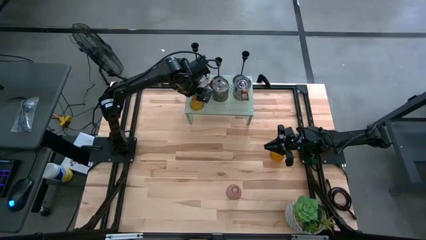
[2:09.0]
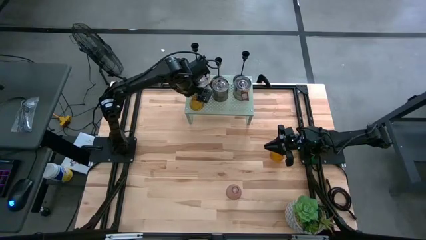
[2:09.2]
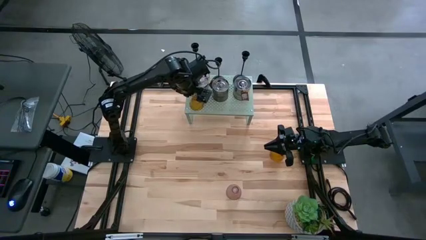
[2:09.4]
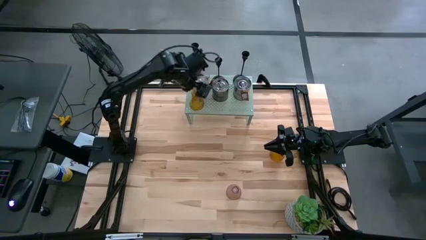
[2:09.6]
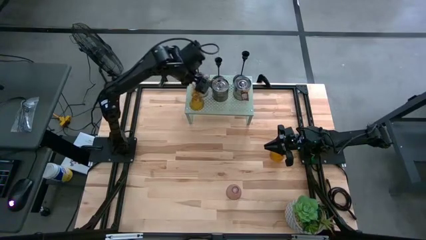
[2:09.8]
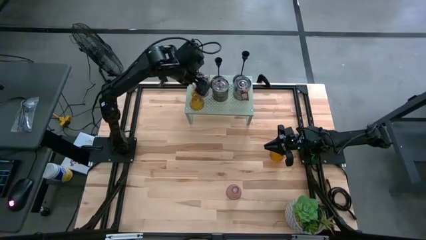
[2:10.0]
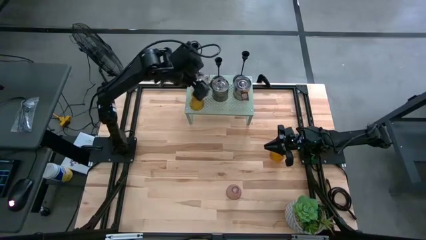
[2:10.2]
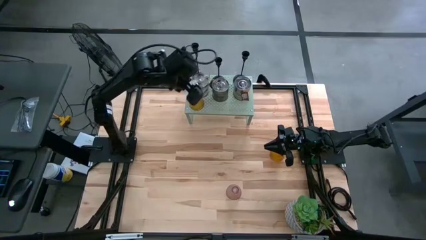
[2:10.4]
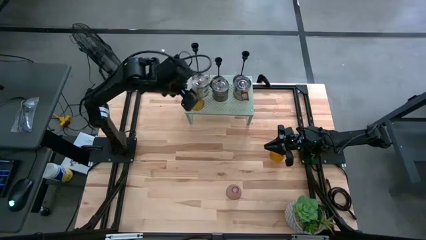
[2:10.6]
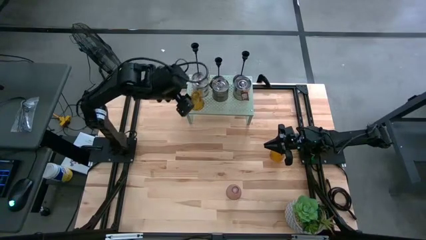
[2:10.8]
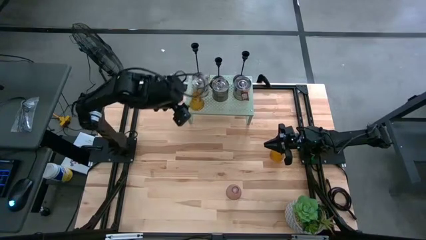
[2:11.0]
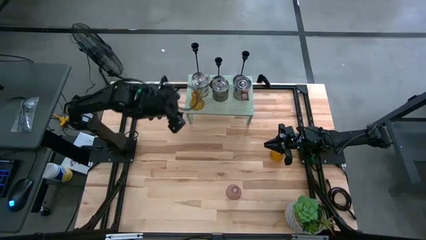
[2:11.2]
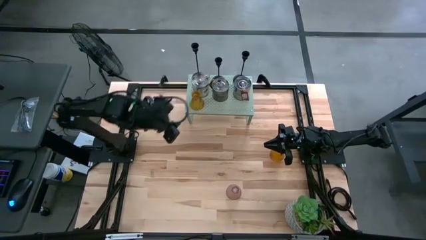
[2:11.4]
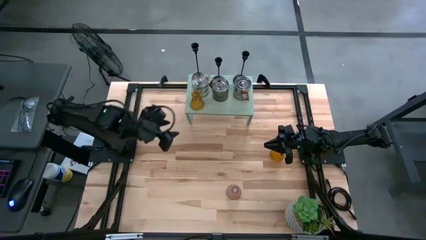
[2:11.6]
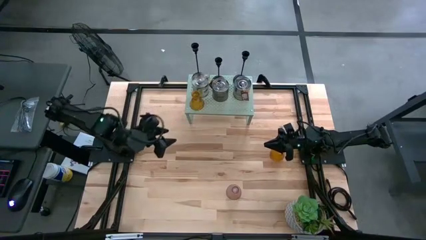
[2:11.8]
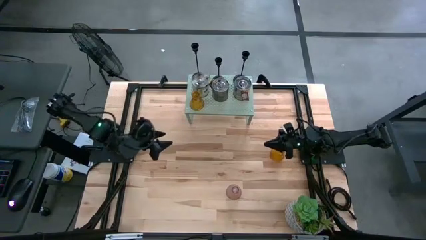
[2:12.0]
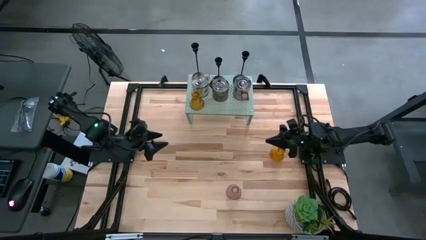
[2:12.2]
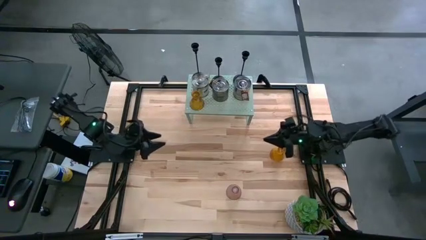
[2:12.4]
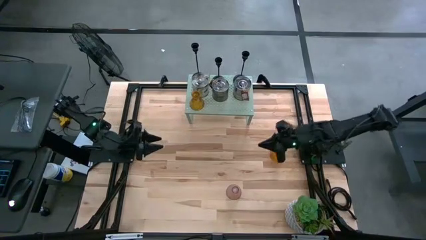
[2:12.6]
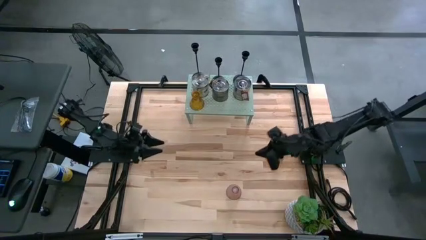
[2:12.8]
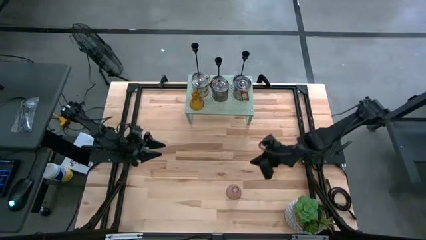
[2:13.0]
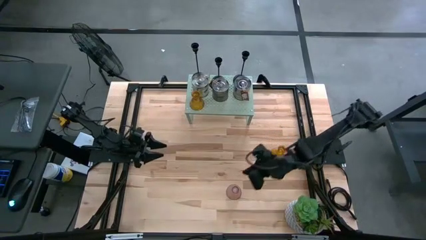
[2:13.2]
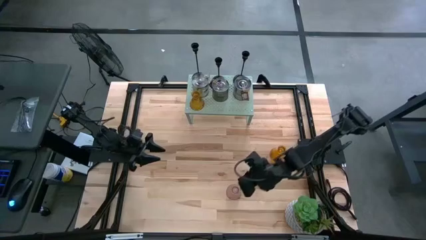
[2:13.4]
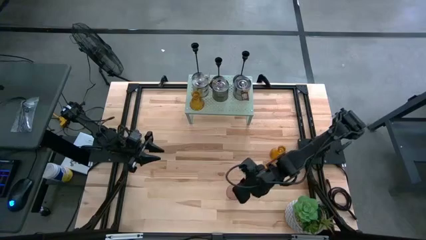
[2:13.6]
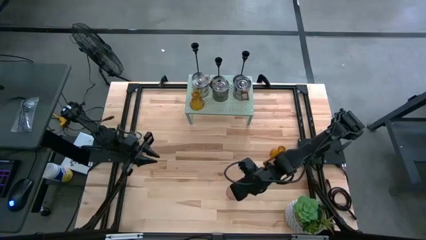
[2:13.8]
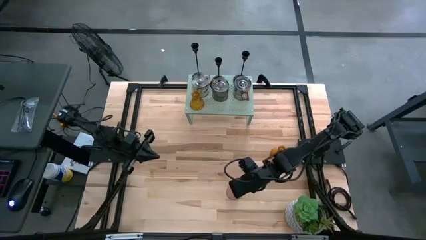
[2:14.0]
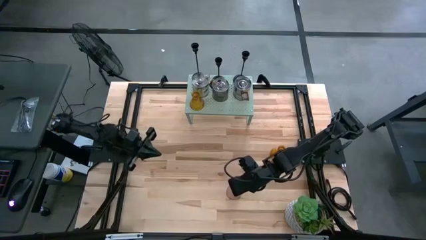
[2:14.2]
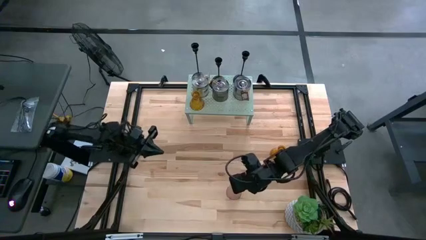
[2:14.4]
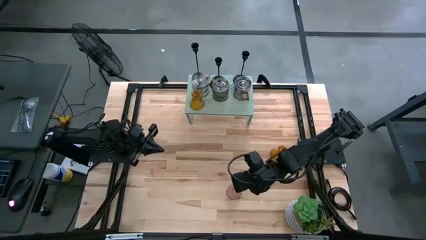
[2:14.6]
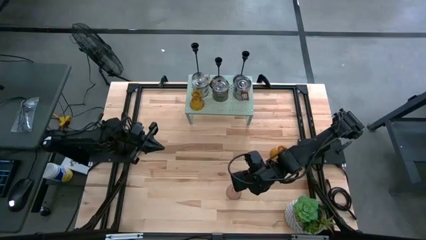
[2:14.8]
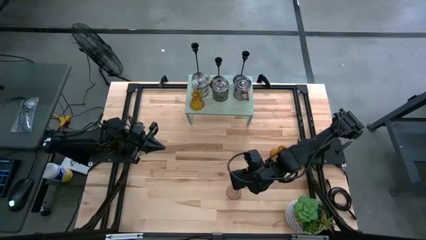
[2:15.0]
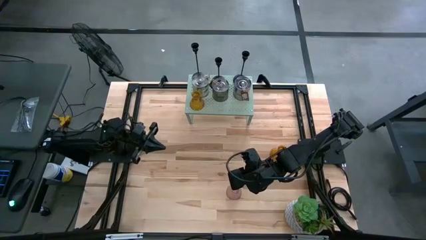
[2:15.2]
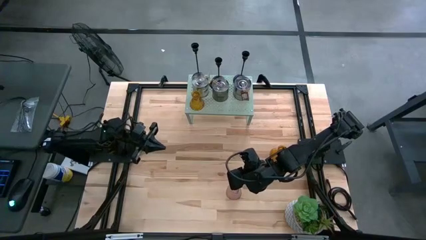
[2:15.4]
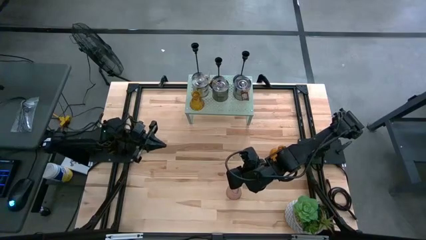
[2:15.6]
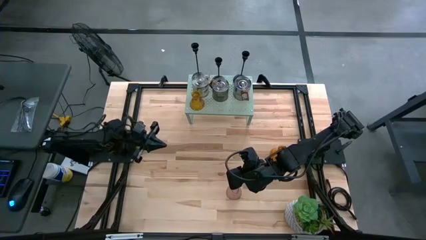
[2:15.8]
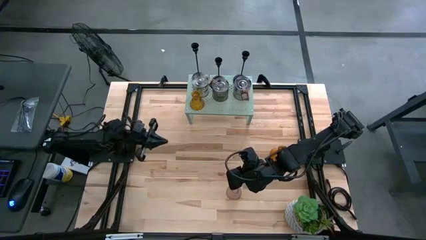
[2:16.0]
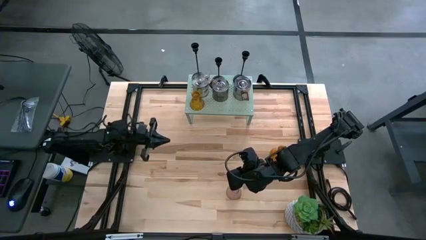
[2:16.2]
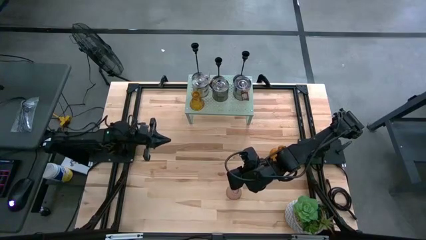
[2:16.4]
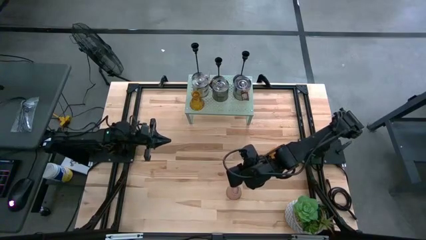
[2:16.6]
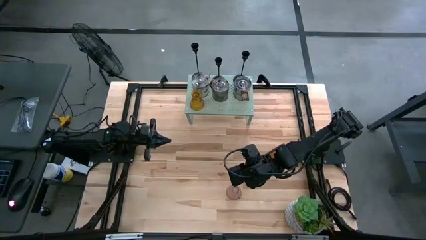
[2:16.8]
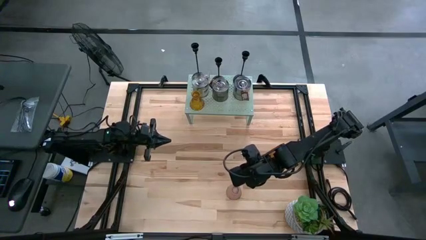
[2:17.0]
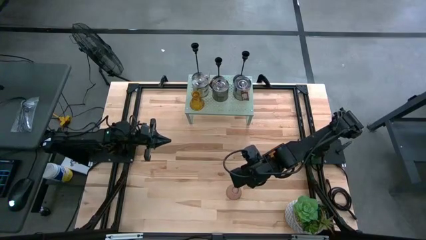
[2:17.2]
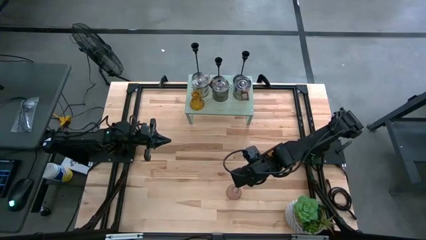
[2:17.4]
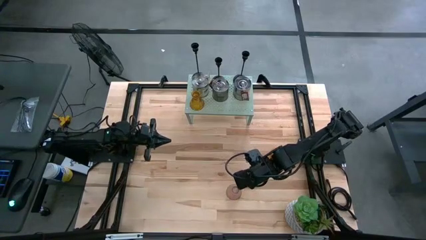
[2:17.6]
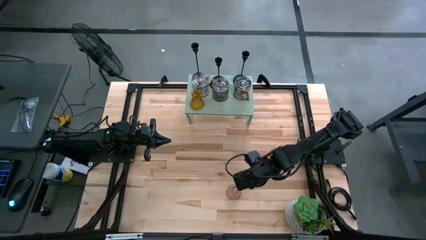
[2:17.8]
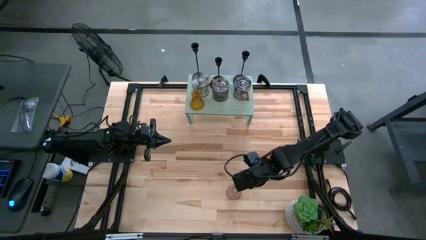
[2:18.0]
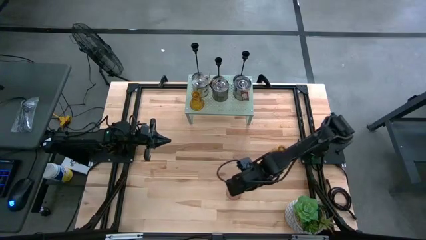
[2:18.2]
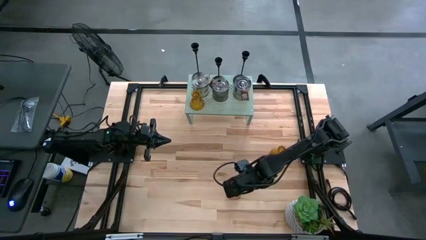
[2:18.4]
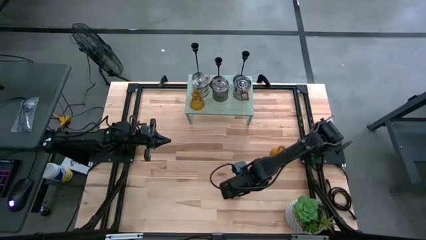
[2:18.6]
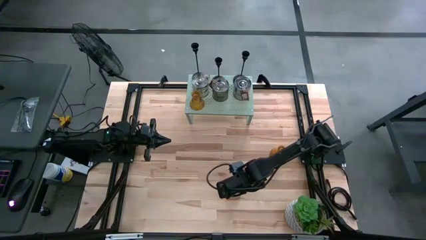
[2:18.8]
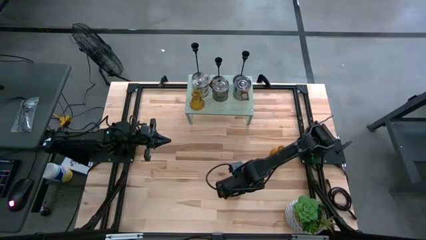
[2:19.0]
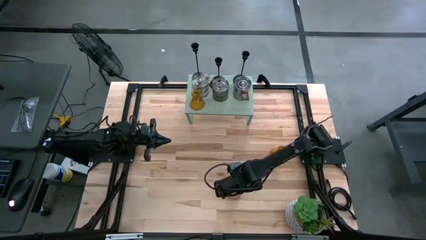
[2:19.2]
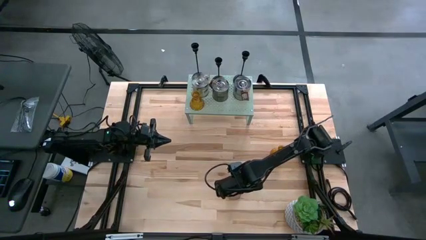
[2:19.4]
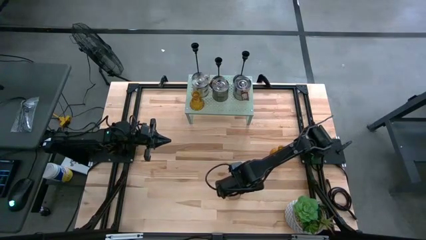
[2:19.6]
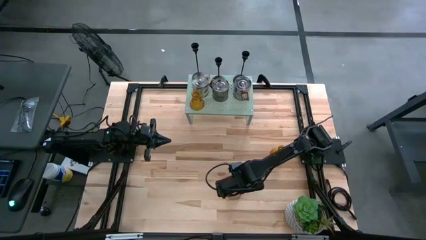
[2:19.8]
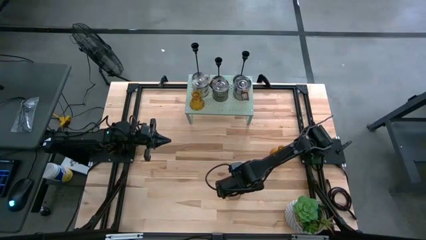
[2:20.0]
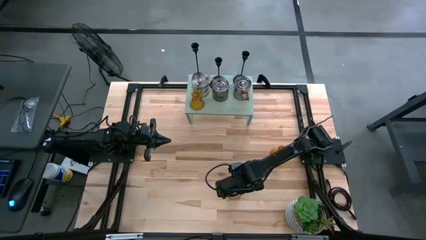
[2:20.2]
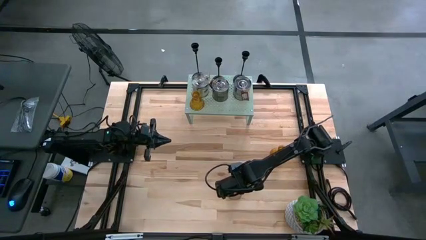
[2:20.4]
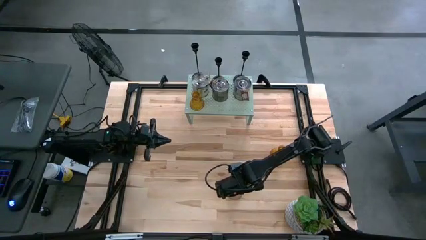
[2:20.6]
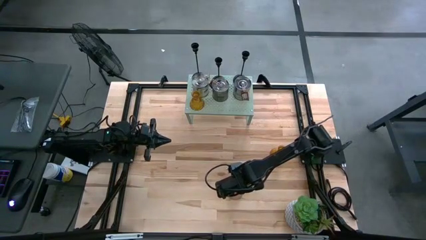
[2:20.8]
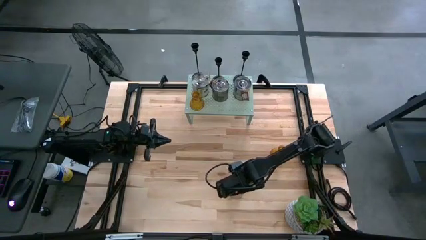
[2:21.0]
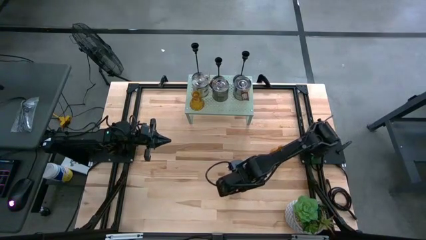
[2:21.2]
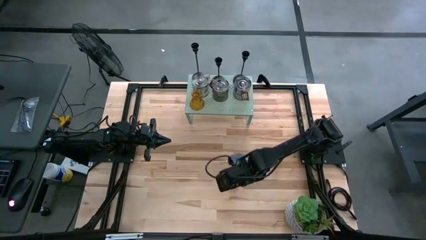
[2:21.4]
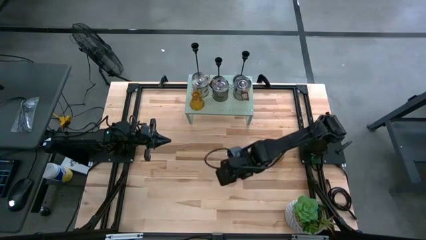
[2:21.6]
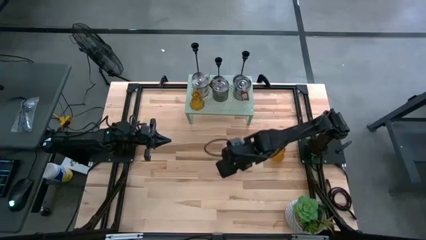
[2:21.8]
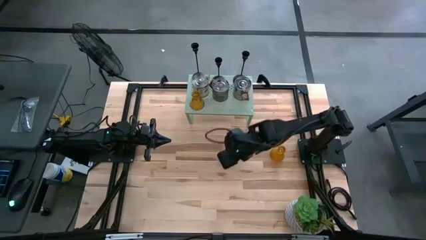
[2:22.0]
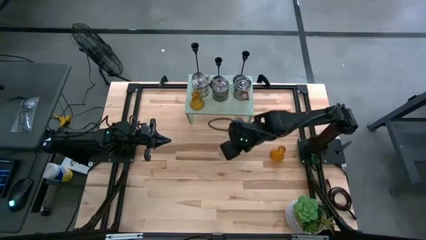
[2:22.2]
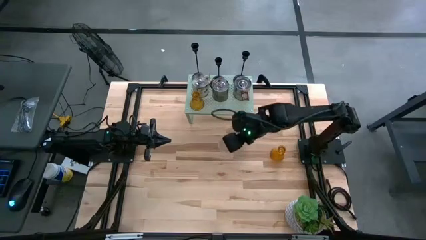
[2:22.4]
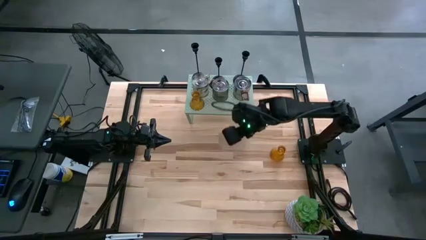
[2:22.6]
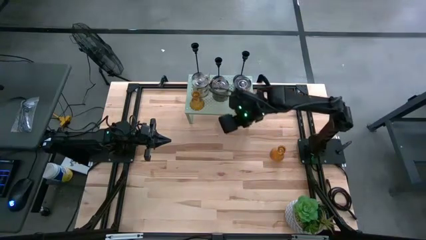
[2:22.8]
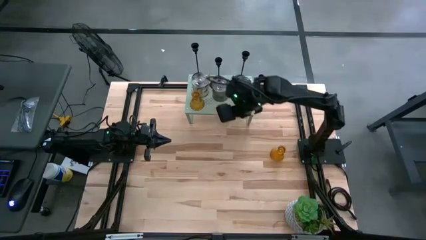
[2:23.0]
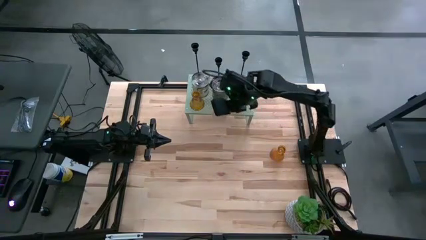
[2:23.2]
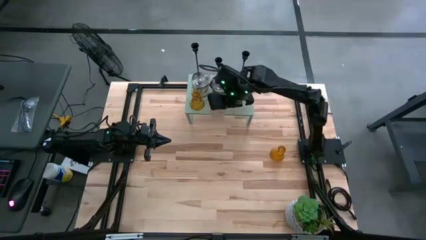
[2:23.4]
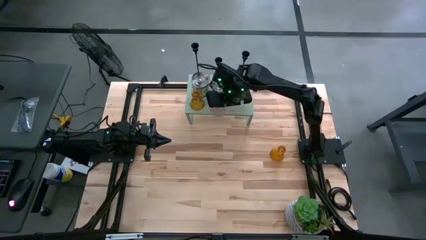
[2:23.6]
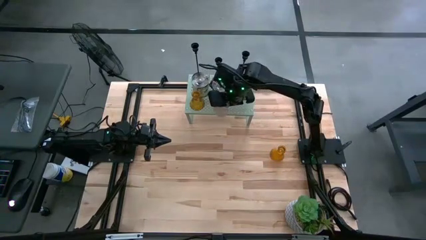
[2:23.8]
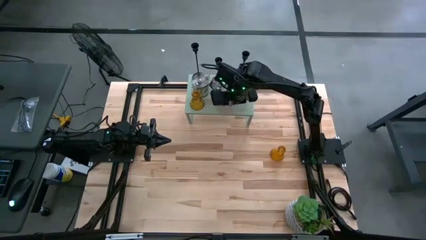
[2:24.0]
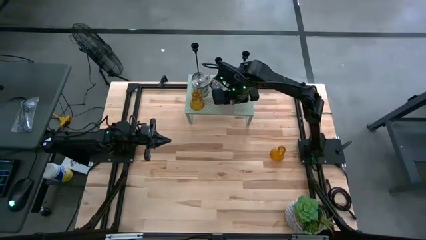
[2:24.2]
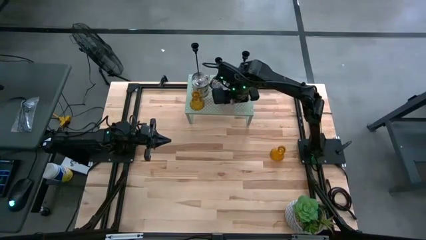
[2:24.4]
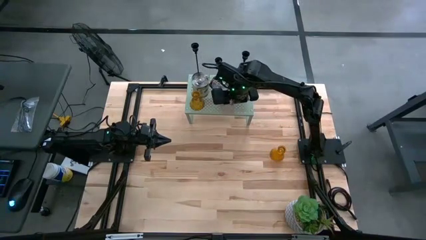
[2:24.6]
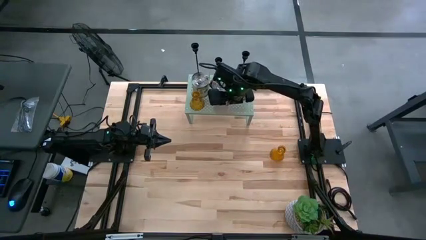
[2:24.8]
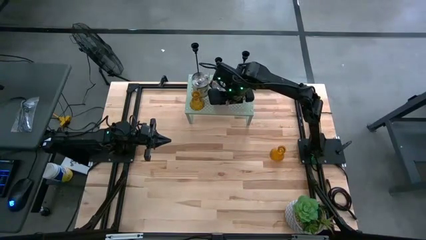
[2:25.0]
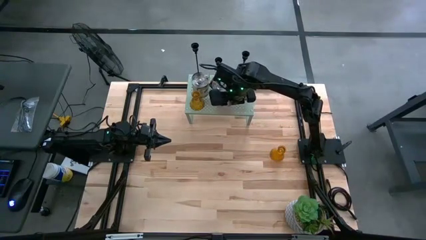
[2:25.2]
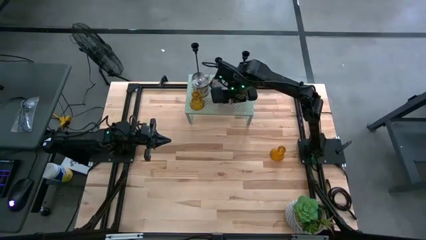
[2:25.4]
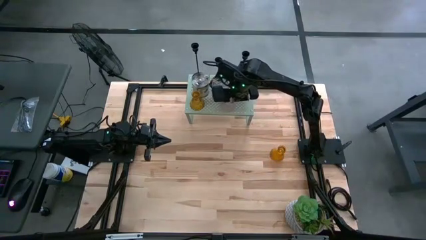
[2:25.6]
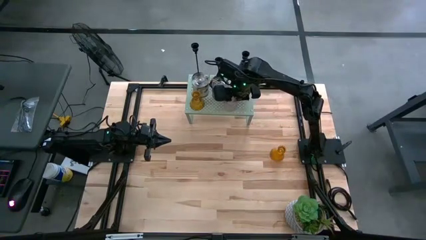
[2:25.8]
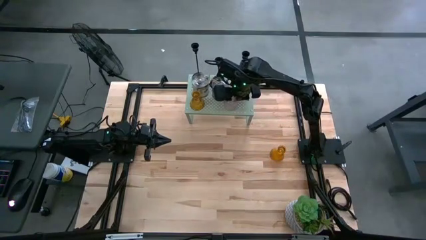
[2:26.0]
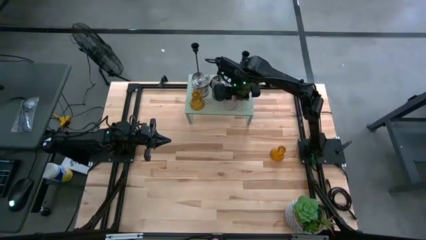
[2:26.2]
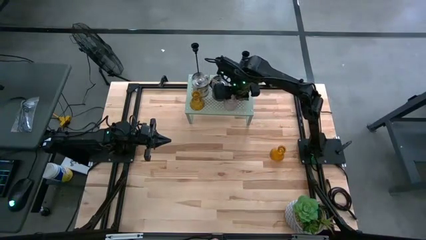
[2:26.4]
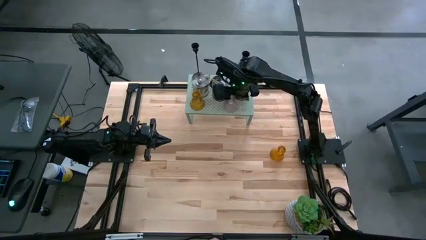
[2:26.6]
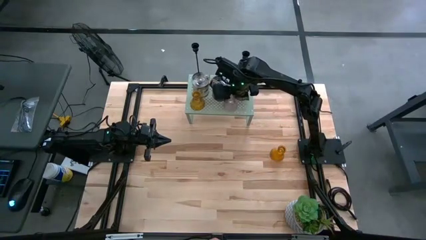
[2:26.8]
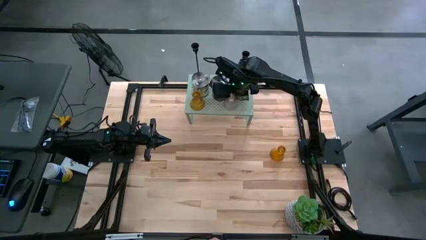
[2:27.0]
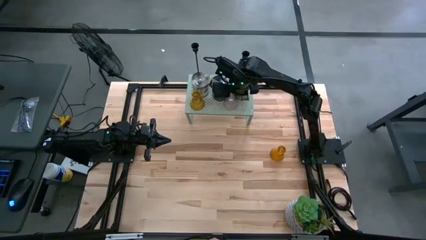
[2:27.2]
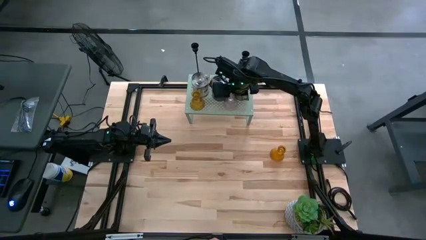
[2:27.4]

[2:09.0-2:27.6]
Task: Pick & Place candle stick holders
Put the purple glass candle holder on the shelf
